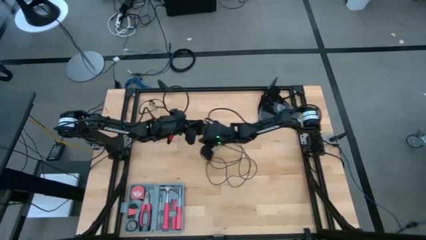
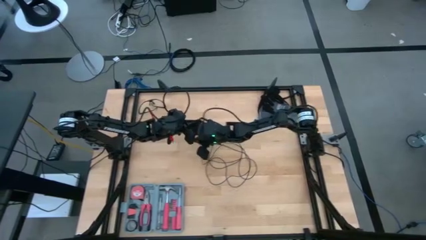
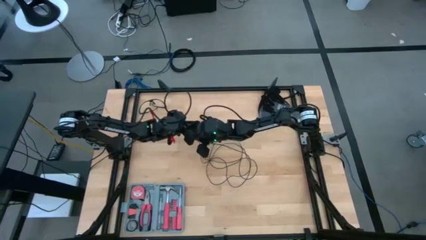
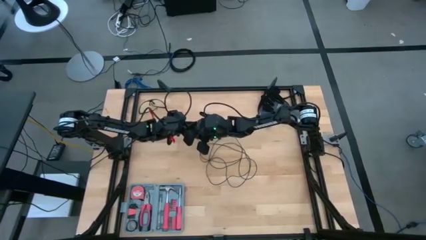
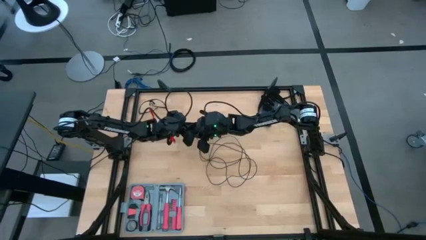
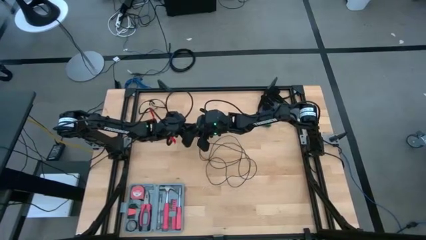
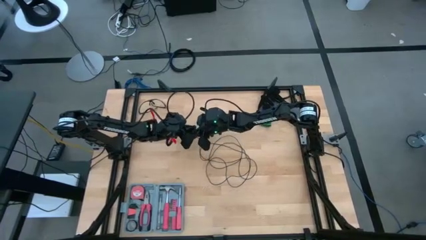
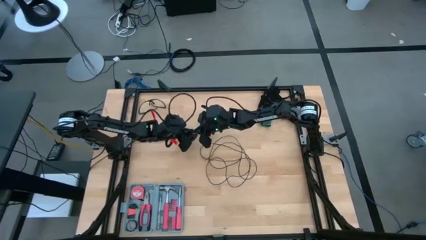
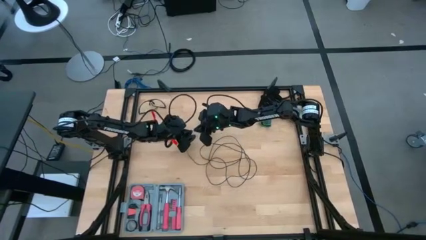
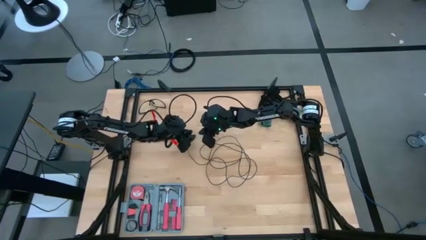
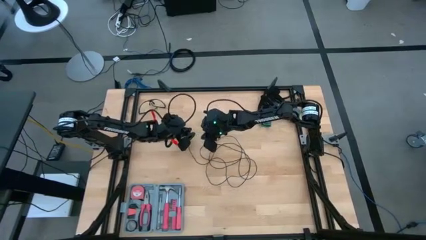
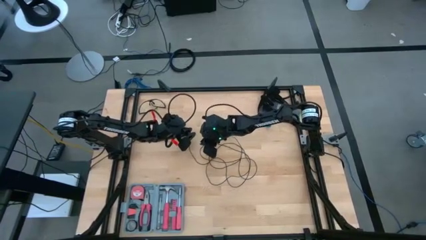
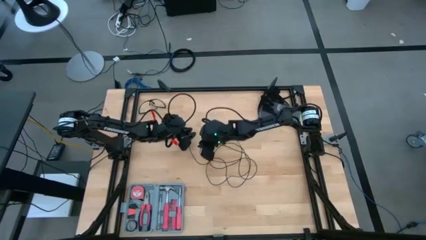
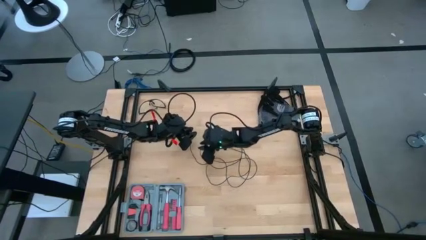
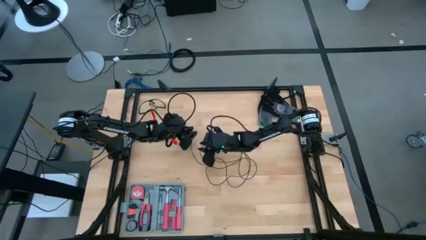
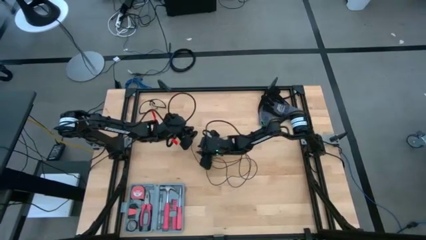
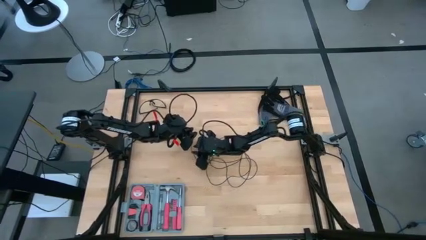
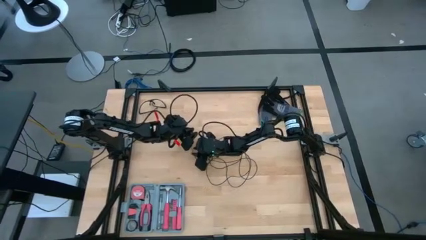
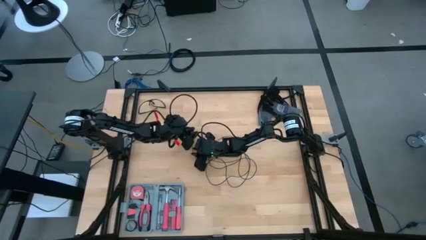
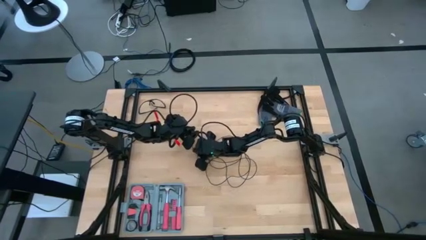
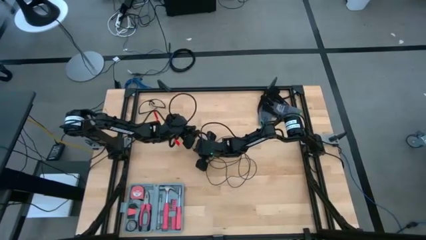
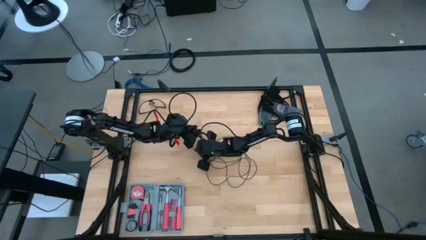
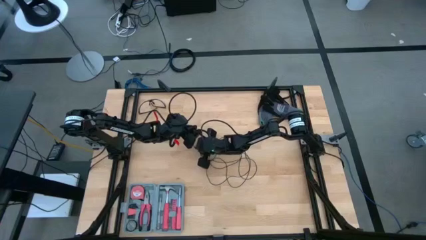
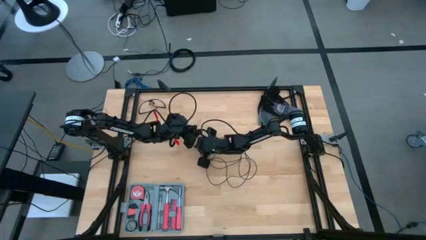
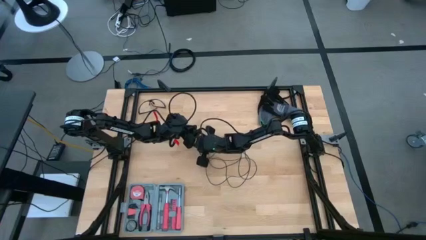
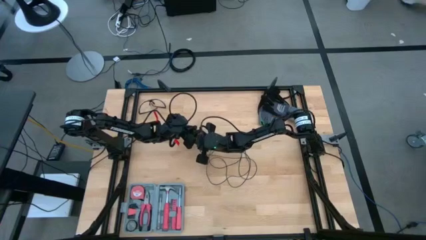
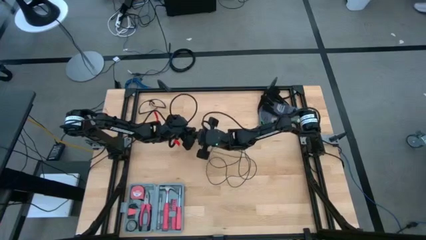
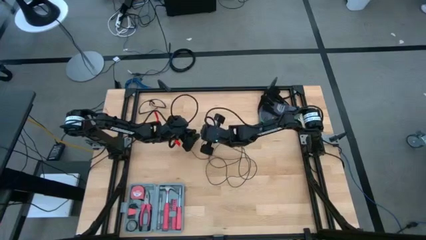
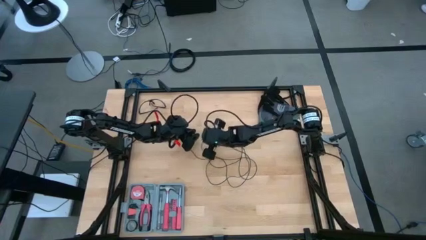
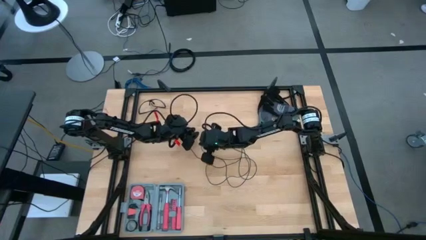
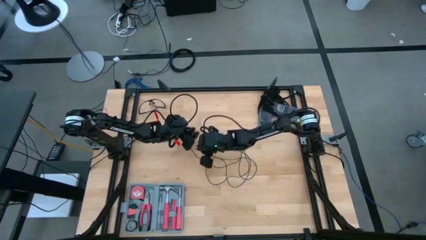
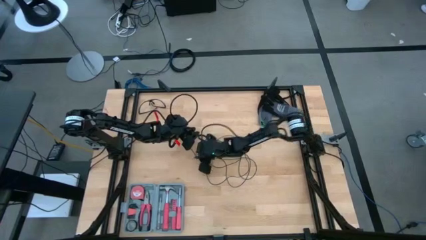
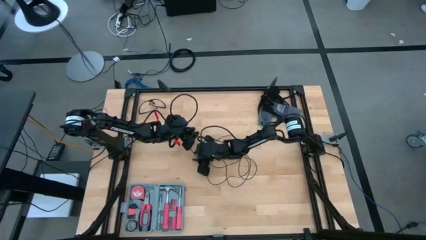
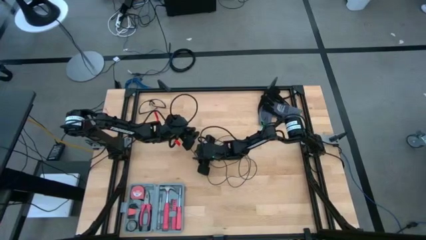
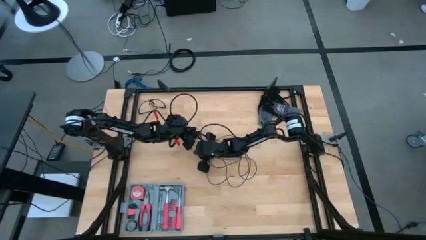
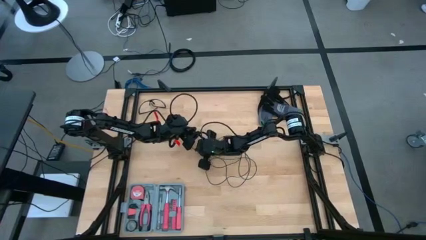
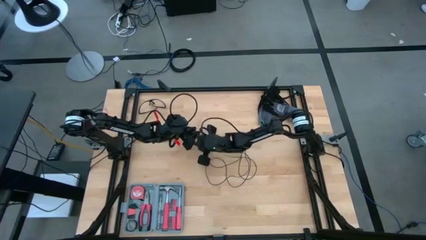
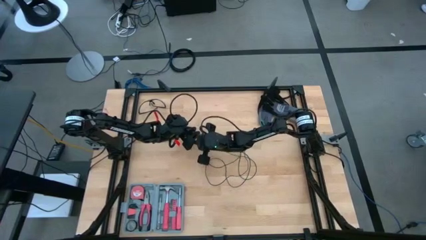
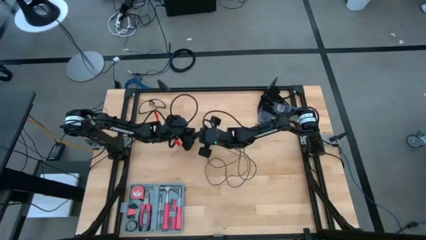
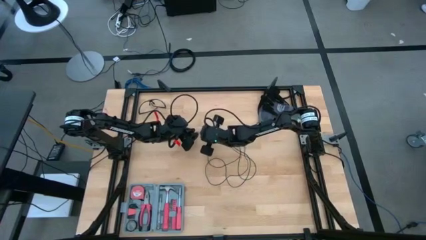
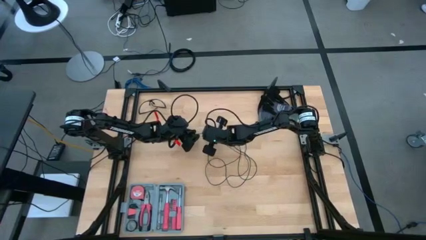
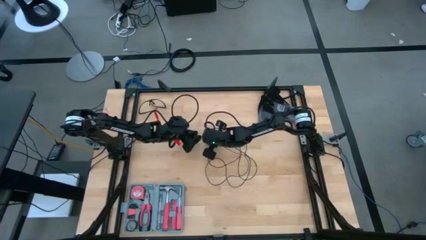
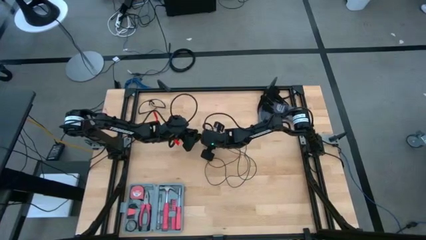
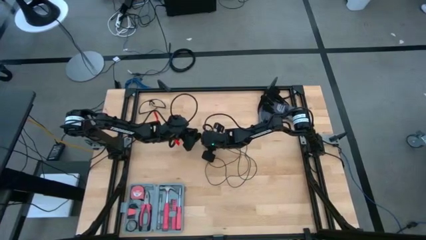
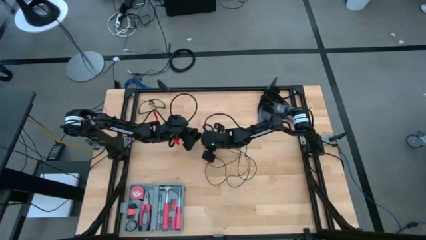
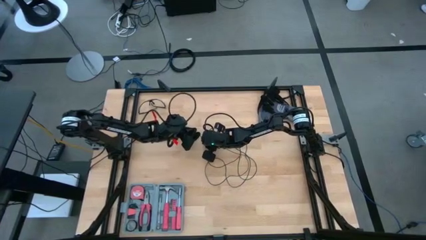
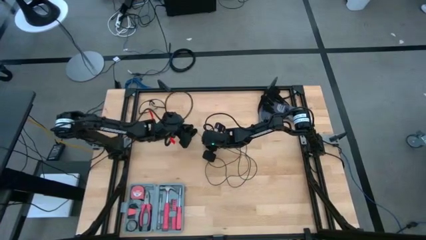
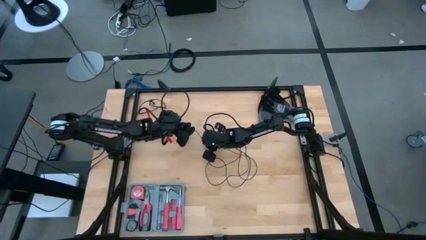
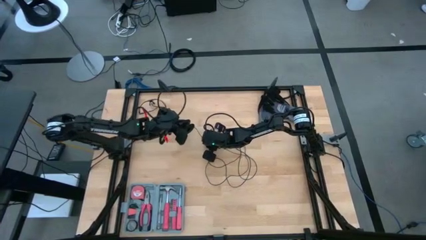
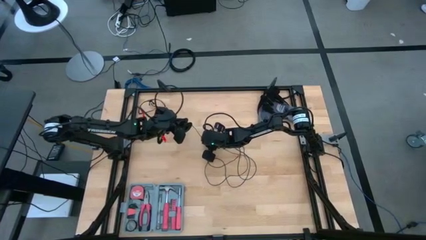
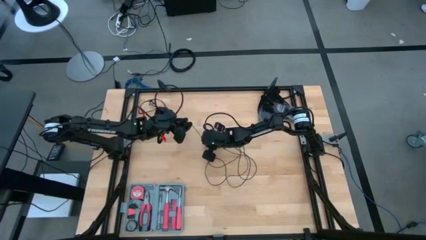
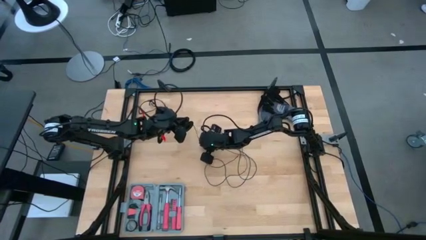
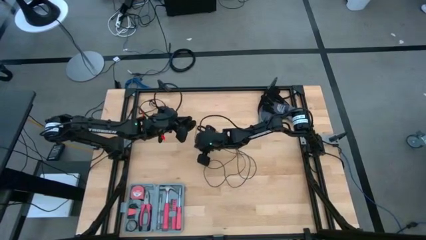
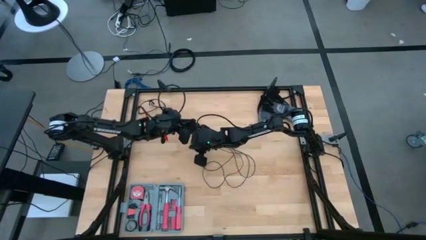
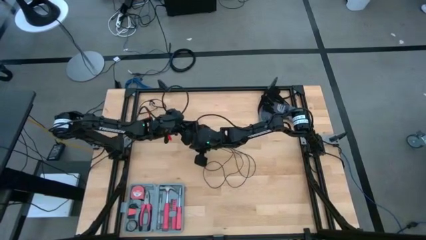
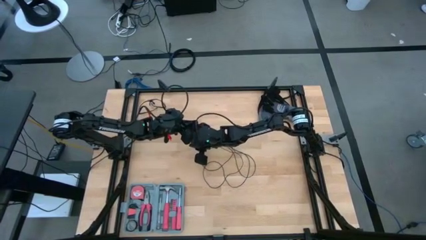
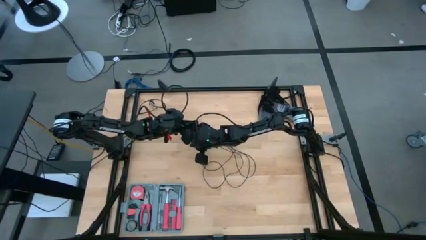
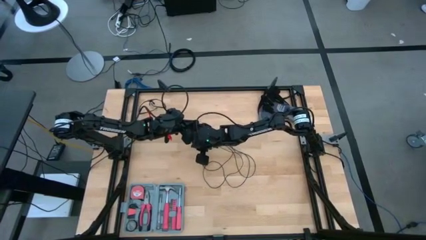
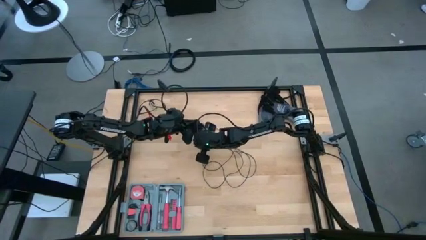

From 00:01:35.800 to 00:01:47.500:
Task: Coil cords
Coil the black wire onto the black spool
